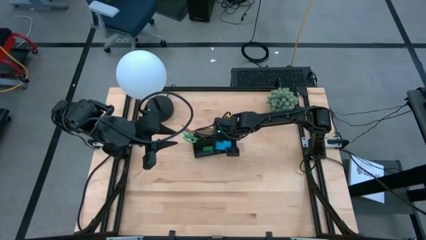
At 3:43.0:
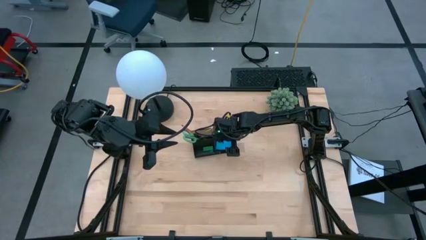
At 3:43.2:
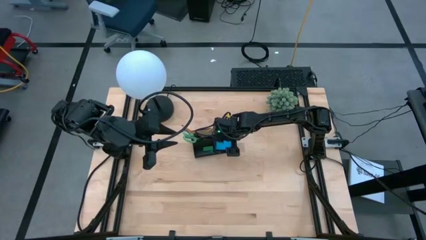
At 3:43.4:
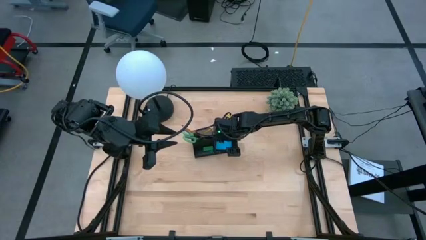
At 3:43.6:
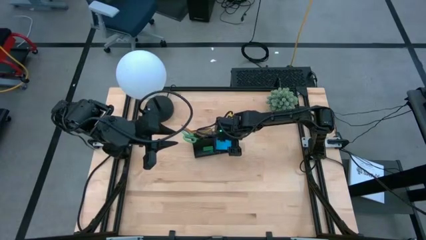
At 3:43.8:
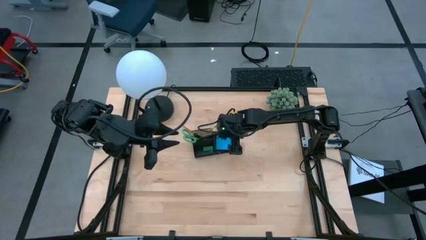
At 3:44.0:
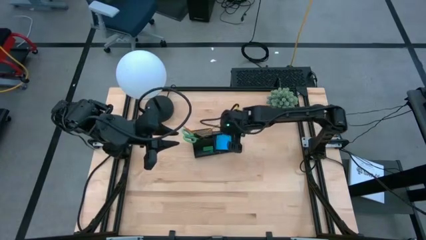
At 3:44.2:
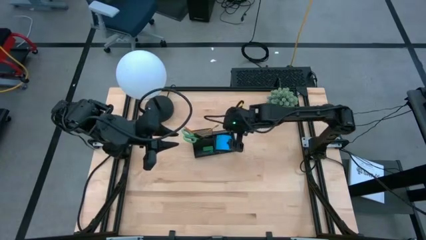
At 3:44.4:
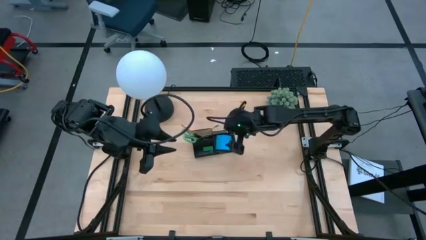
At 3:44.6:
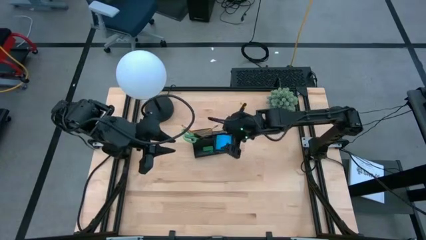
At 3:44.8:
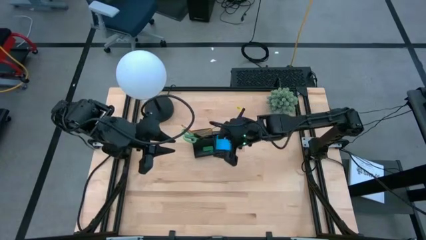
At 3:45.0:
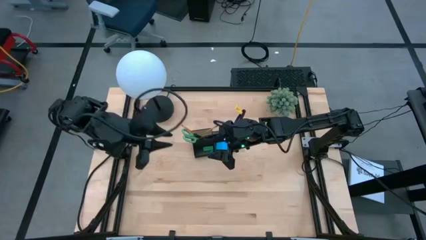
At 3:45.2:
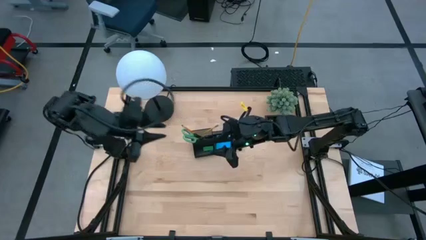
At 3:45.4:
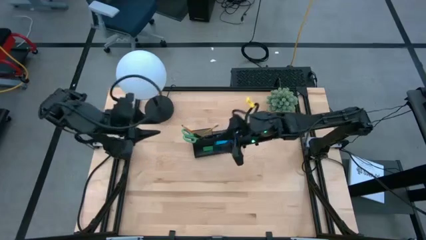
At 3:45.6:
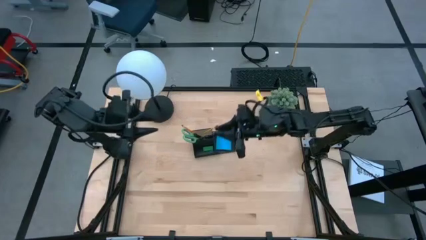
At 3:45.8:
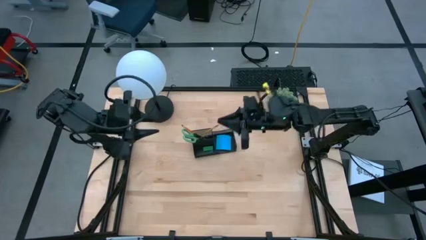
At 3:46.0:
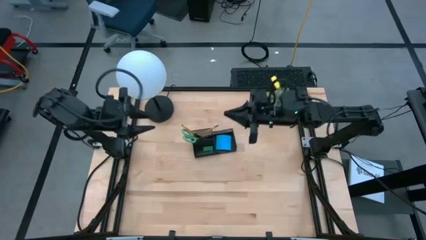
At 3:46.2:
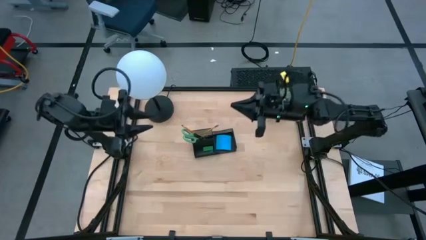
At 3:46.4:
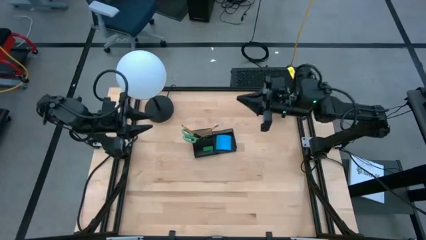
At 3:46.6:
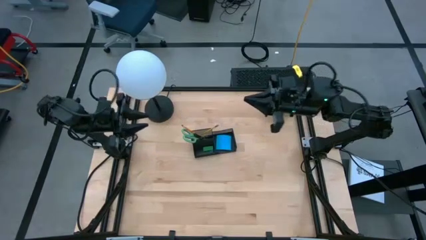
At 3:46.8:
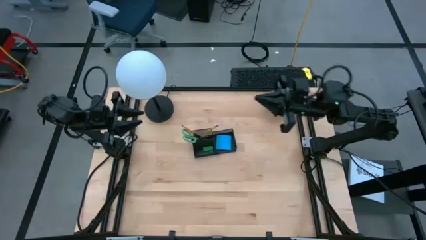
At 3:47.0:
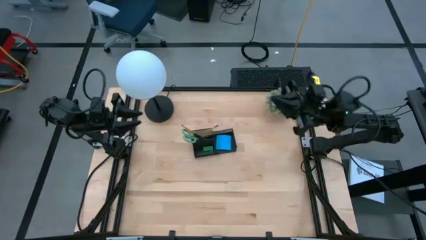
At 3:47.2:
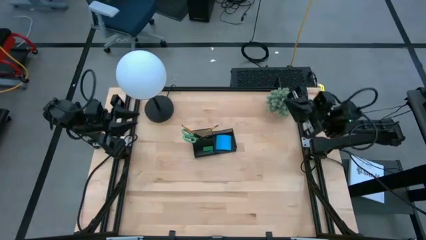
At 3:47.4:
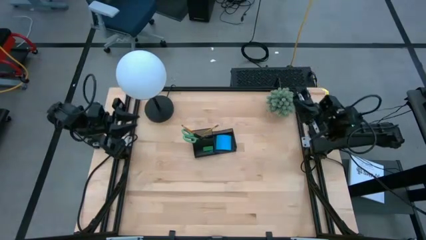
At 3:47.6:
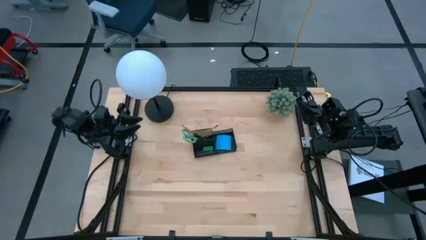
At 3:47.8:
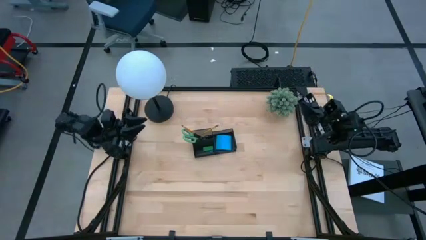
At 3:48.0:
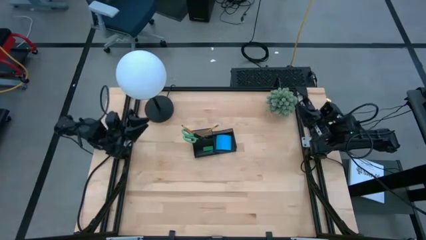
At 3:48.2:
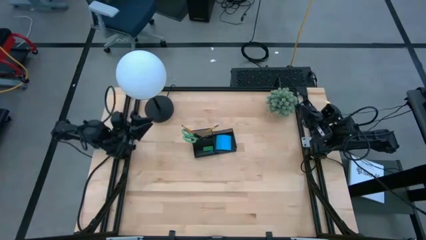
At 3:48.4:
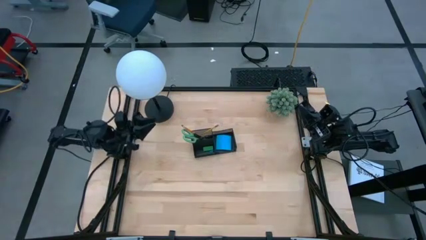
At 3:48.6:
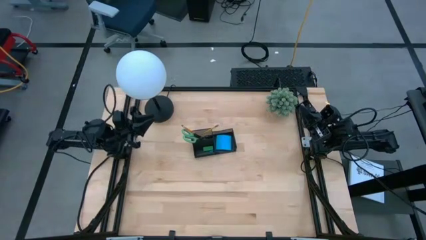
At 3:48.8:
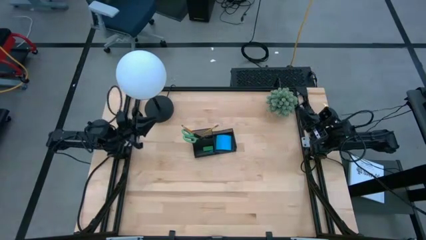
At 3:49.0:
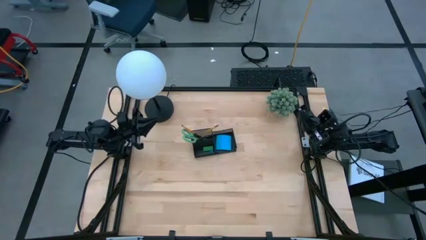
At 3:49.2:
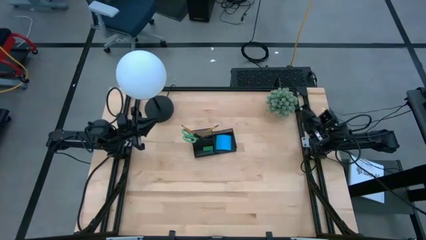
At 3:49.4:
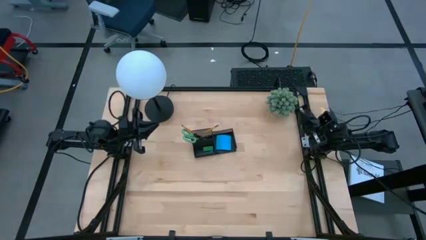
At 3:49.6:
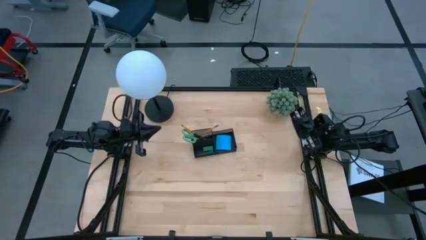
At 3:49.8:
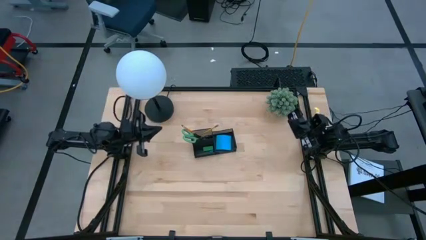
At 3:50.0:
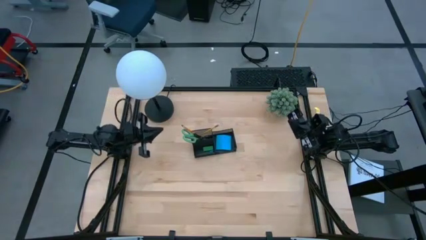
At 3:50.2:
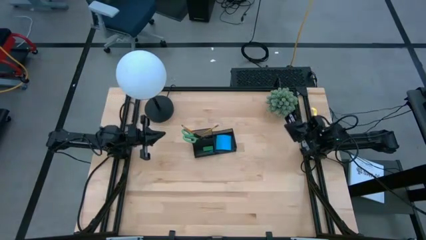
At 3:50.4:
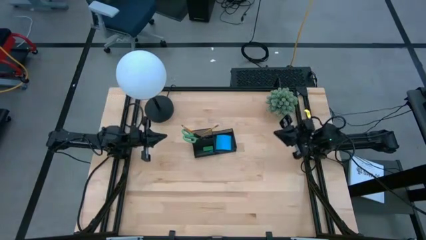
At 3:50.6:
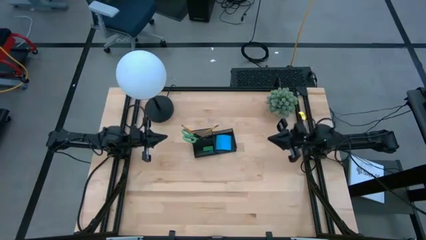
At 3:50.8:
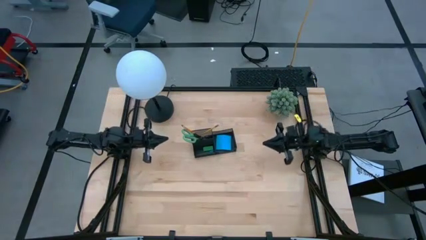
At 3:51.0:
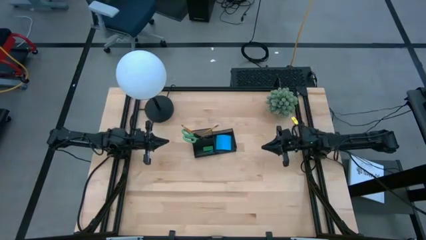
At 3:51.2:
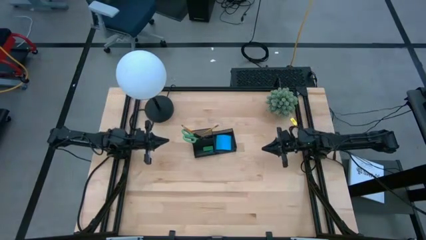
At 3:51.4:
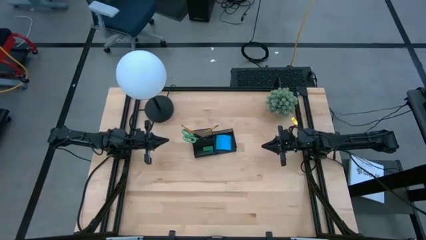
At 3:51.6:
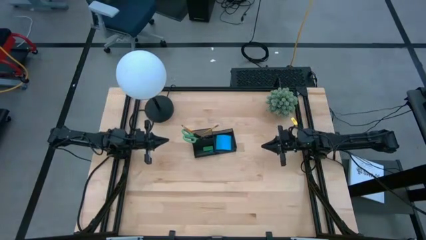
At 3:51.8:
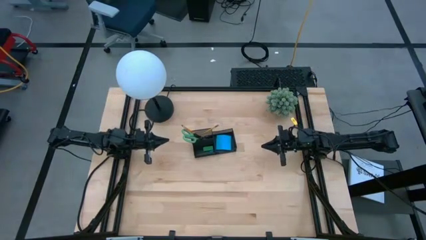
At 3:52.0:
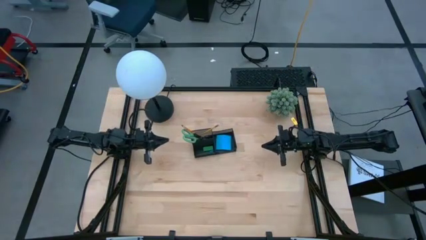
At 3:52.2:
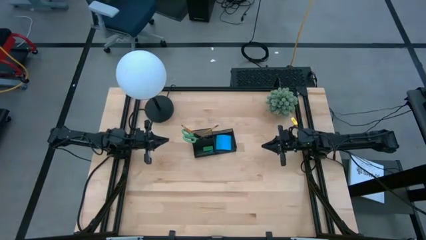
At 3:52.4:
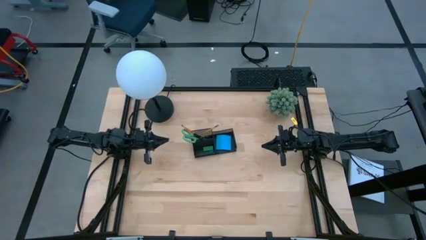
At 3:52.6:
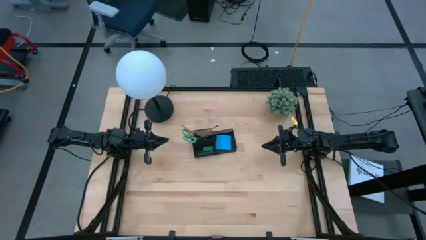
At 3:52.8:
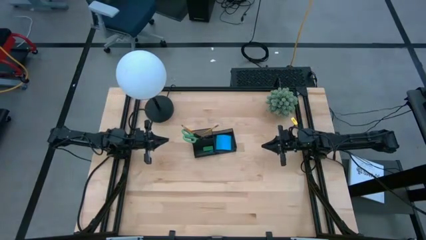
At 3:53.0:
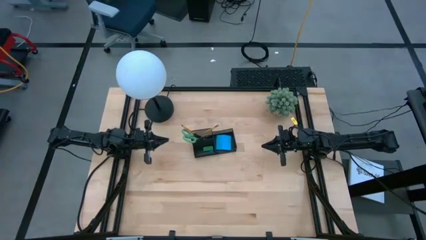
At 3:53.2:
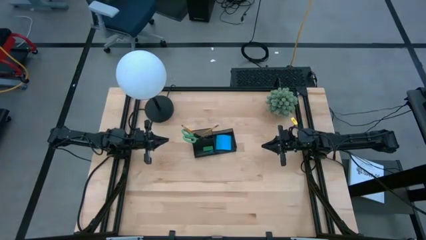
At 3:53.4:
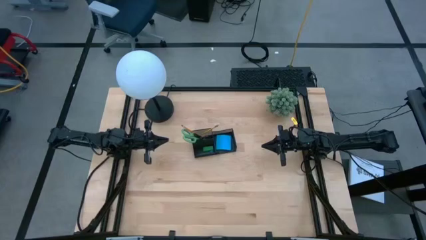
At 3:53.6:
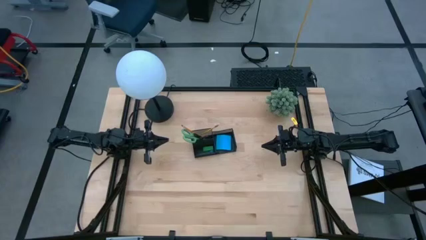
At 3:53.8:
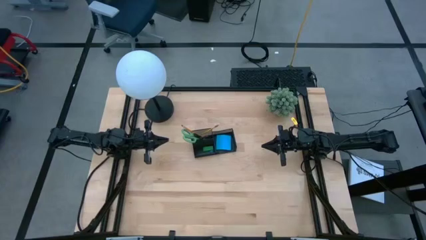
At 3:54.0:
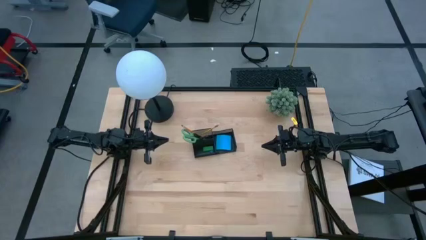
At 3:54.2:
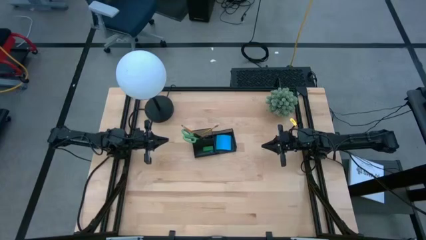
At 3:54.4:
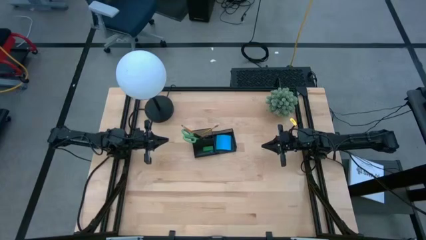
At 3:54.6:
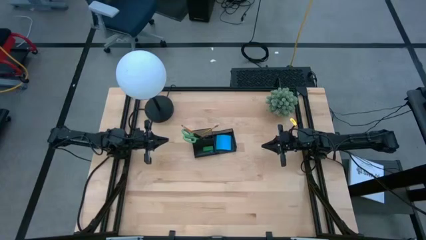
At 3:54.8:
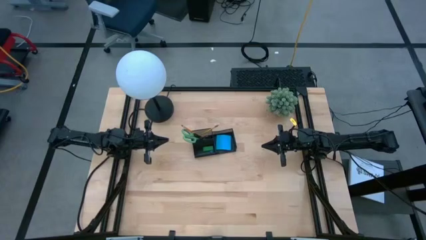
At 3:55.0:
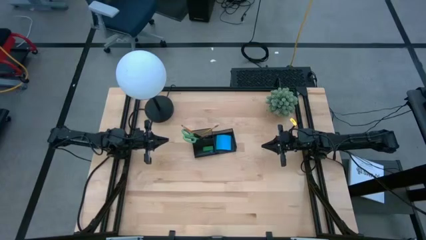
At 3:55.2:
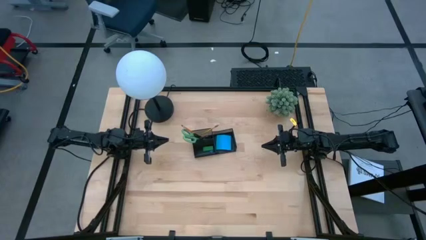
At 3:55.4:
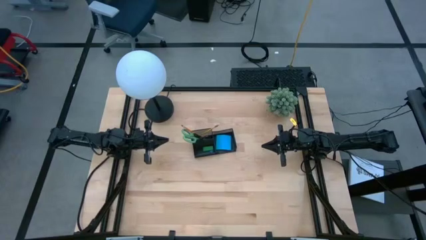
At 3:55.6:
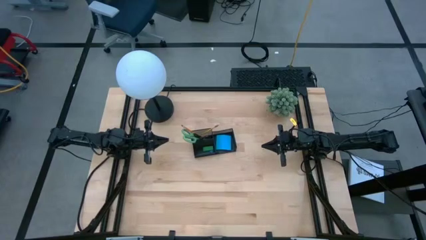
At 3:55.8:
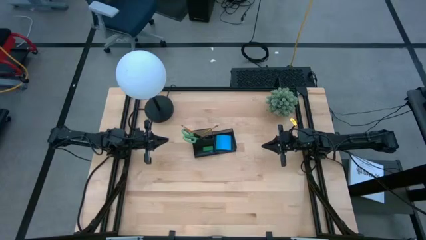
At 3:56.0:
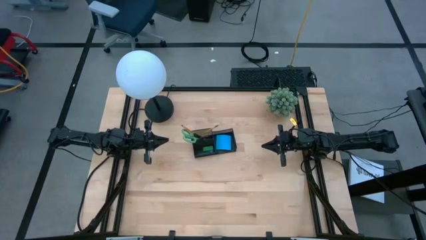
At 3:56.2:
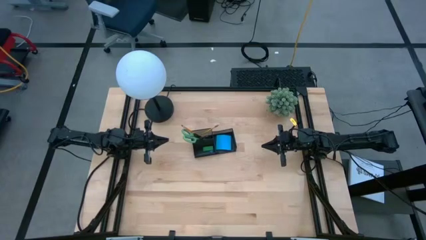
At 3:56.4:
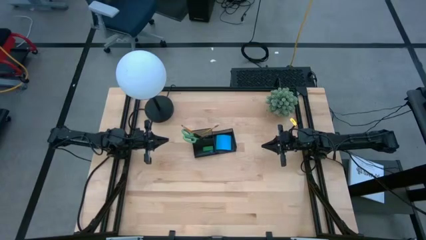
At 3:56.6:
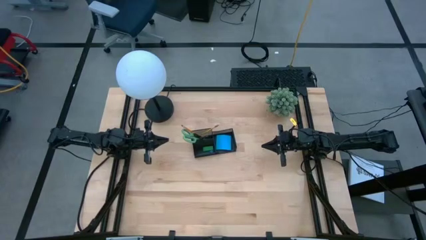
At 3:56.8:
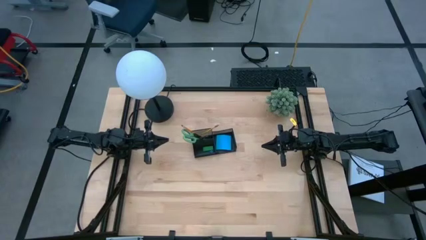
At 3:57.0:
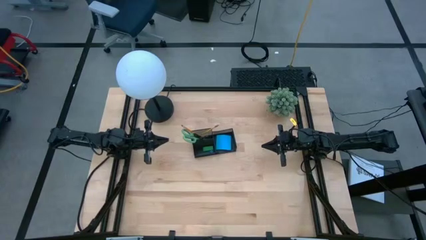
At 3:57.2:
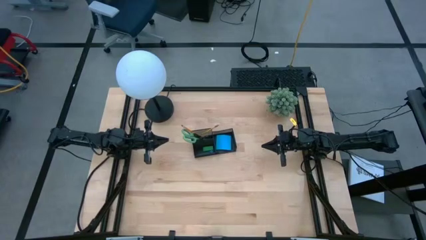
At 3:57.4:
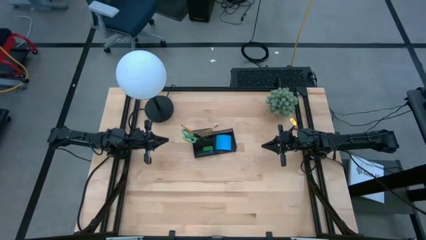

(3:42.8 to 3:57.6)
Task: Pick and place office supplies into organizer
Return to Home Position

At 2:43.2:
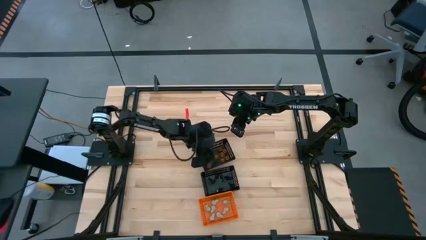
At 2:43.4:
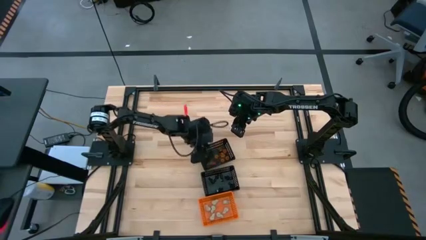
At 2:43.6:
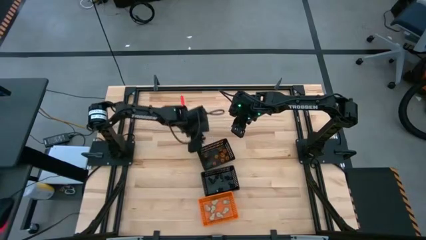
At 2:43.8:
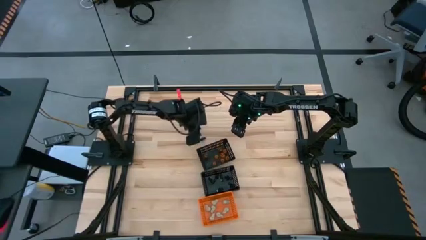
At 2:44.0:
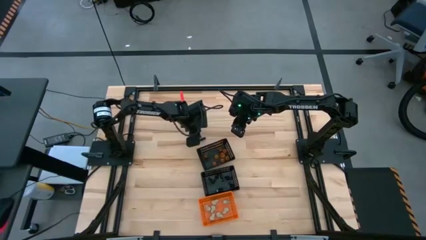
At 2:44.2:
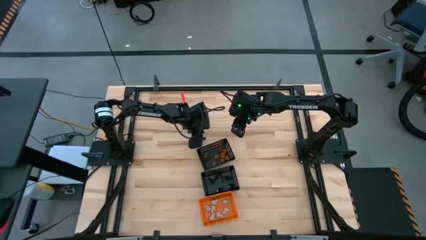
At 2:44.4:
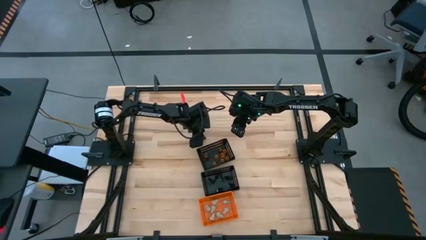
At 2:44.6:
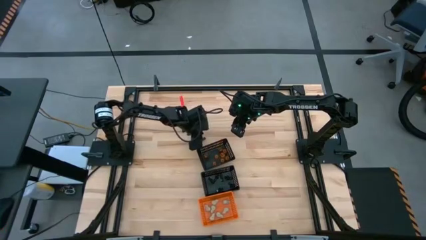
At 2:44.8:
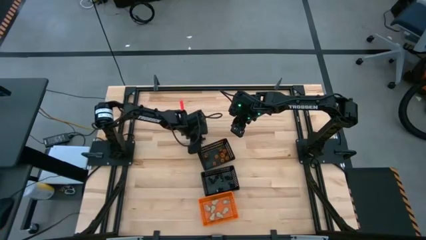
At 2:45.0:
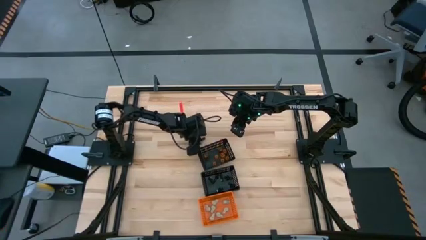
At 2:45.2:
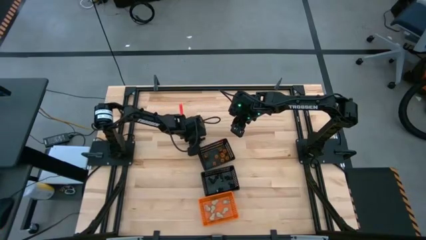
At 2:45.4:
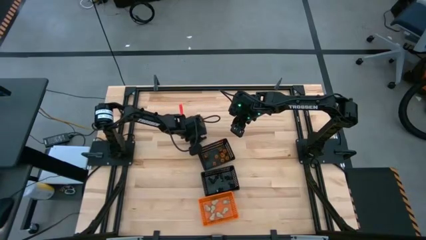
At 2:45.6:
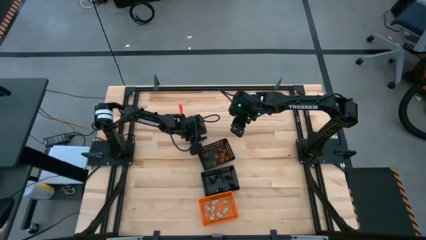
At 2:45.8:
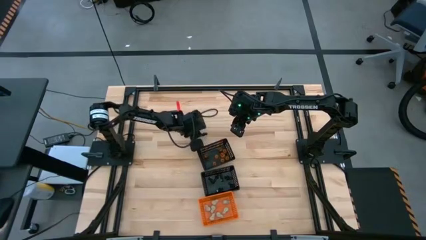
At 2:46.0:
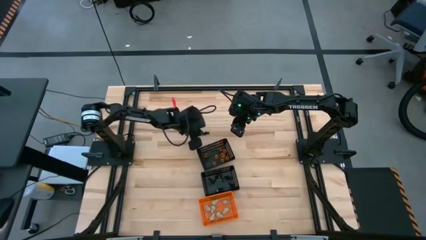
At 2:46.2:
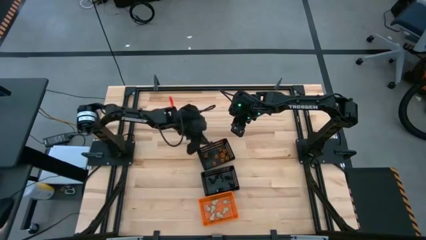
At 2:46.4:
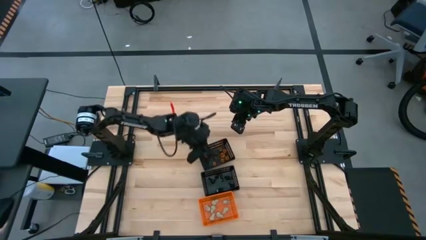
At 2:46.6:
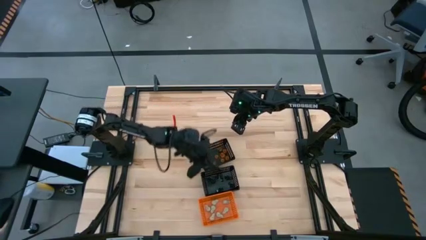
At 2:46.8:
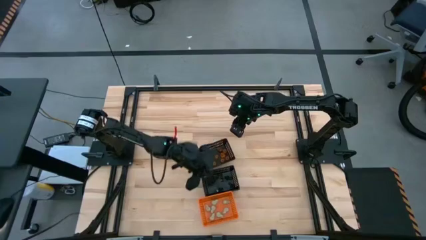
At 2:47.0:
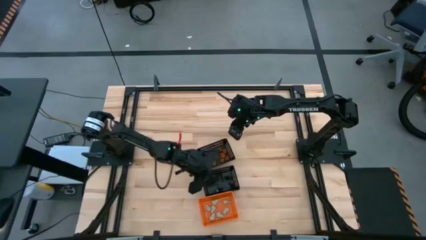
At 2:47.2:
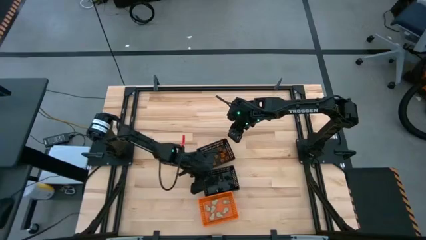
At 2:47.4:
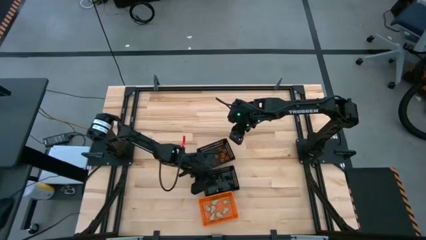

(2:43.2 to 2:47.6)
Task: Sort Halloween decoration
Put the black skeleton toy into the bottom black bin
